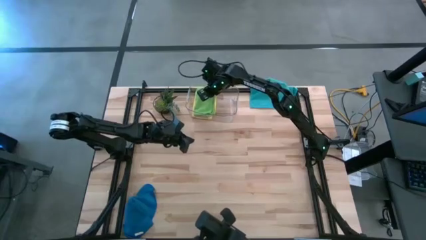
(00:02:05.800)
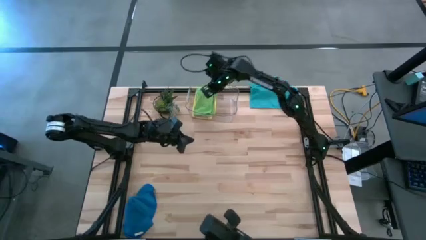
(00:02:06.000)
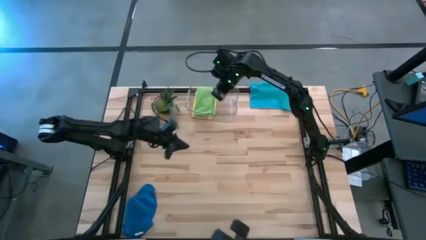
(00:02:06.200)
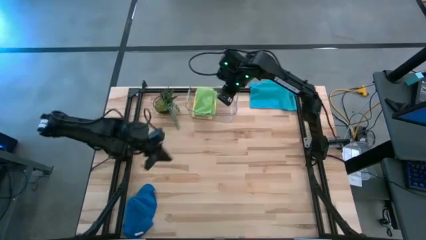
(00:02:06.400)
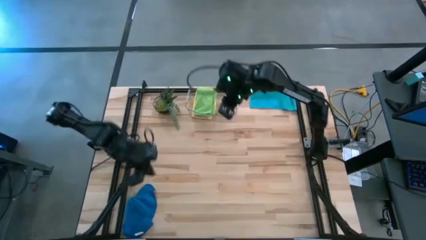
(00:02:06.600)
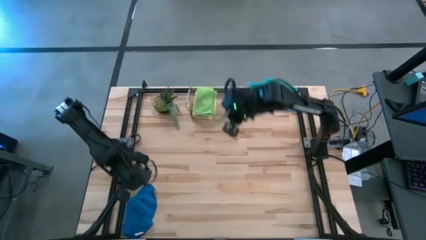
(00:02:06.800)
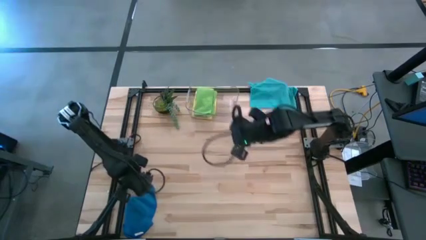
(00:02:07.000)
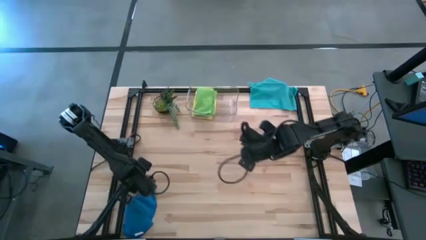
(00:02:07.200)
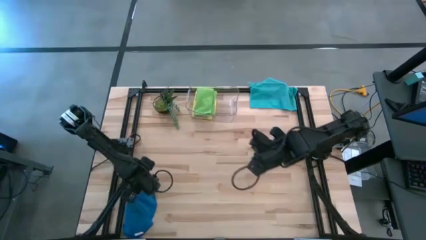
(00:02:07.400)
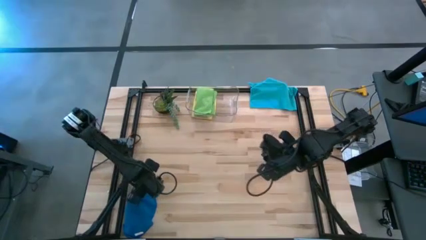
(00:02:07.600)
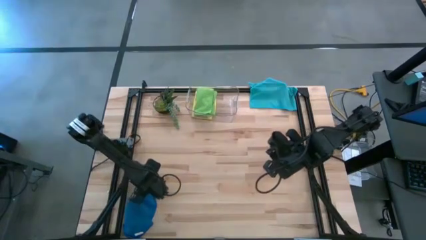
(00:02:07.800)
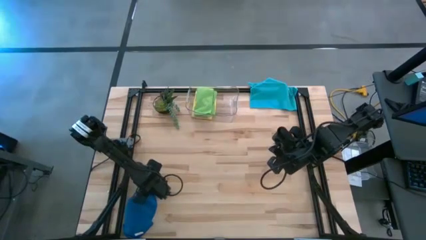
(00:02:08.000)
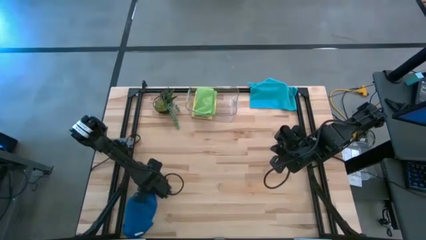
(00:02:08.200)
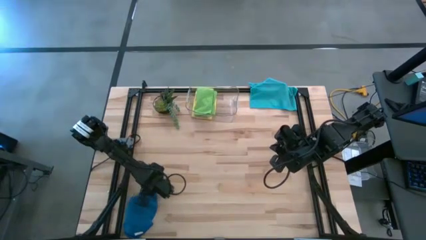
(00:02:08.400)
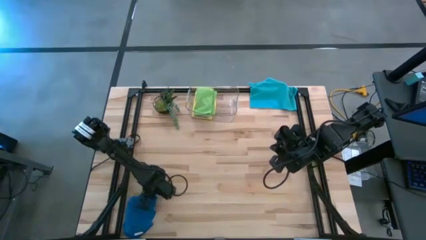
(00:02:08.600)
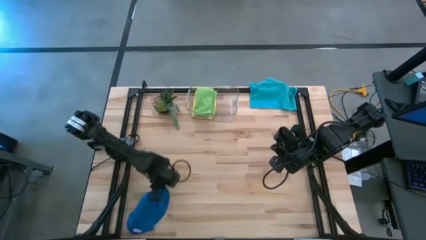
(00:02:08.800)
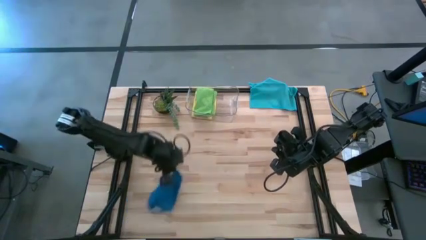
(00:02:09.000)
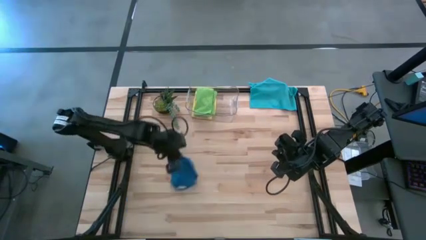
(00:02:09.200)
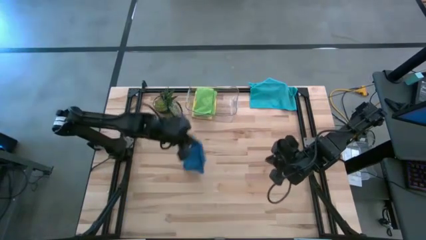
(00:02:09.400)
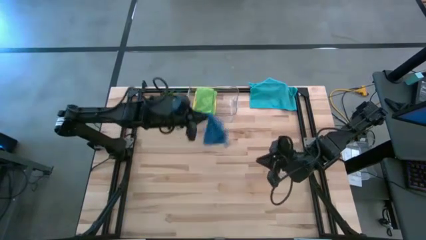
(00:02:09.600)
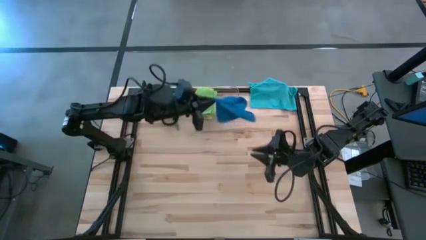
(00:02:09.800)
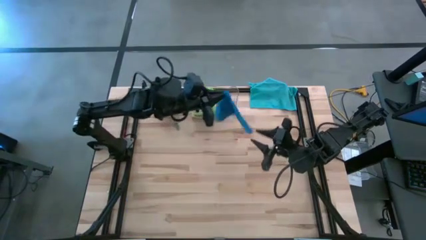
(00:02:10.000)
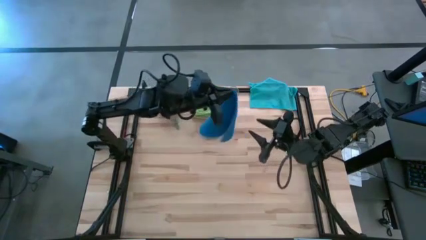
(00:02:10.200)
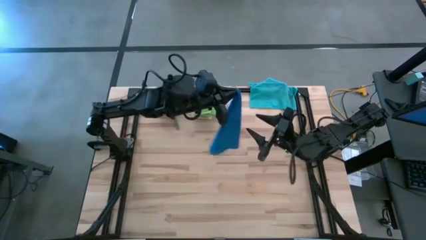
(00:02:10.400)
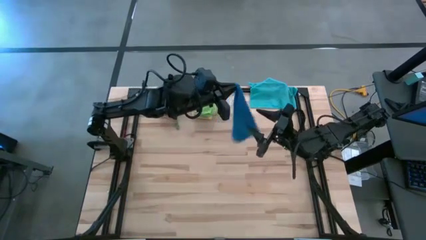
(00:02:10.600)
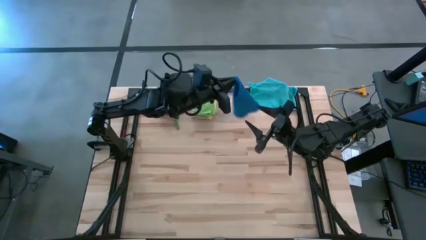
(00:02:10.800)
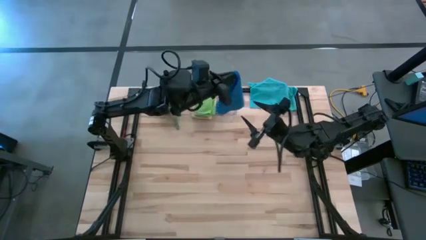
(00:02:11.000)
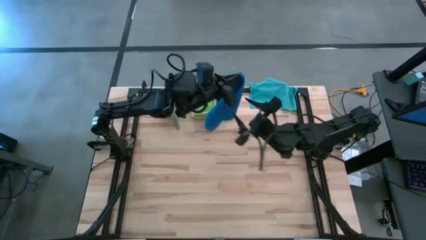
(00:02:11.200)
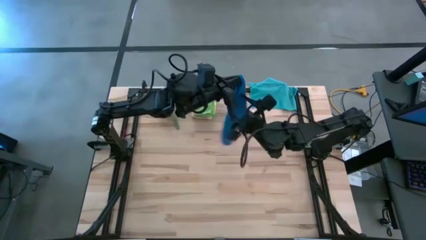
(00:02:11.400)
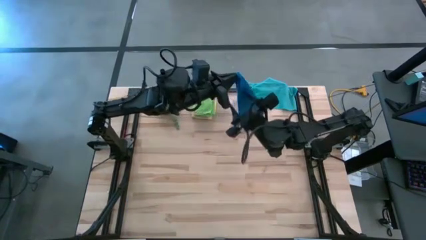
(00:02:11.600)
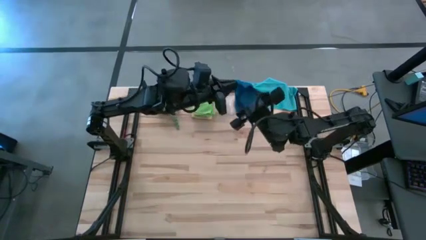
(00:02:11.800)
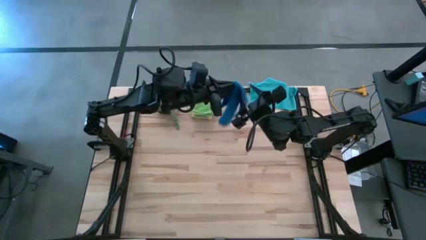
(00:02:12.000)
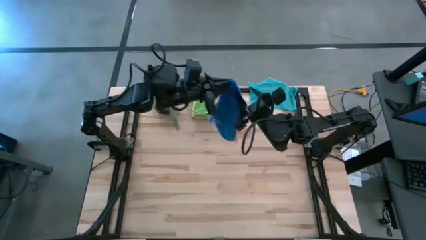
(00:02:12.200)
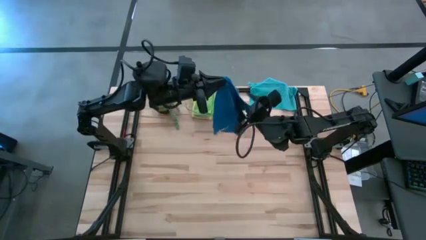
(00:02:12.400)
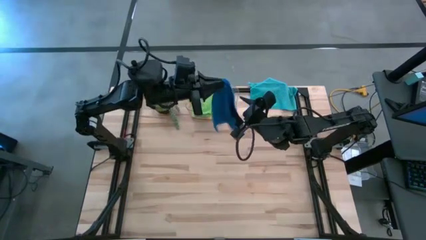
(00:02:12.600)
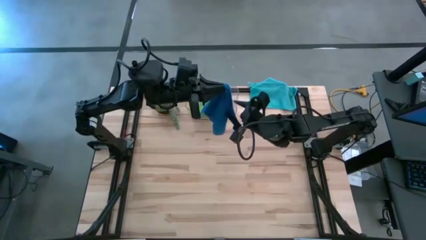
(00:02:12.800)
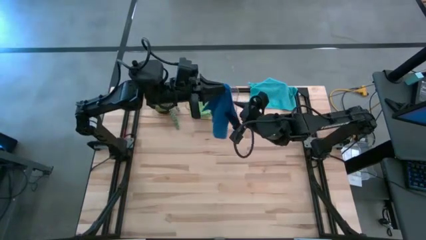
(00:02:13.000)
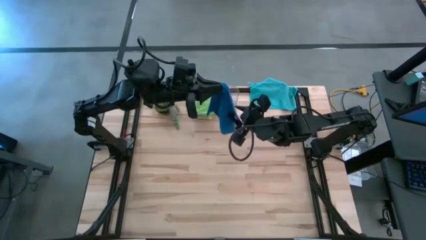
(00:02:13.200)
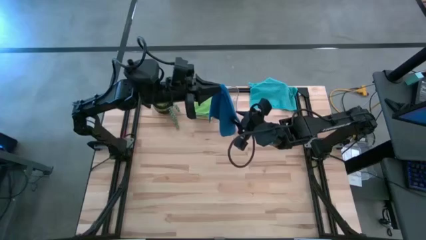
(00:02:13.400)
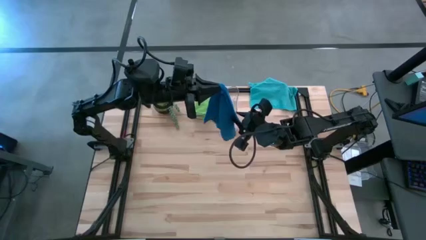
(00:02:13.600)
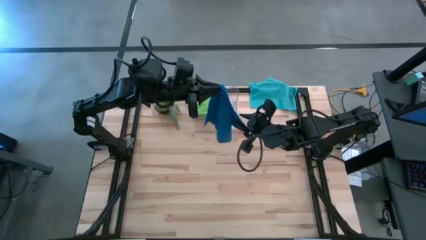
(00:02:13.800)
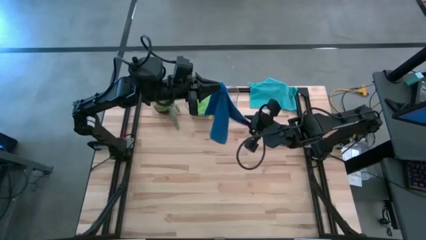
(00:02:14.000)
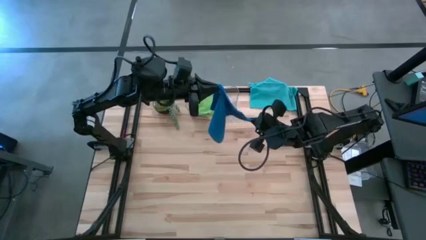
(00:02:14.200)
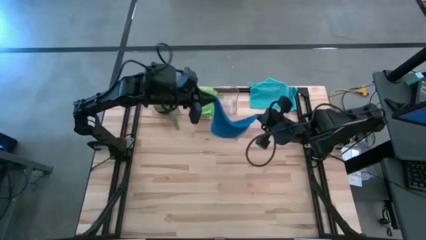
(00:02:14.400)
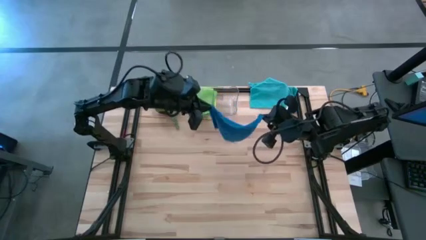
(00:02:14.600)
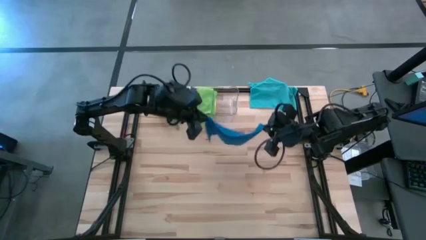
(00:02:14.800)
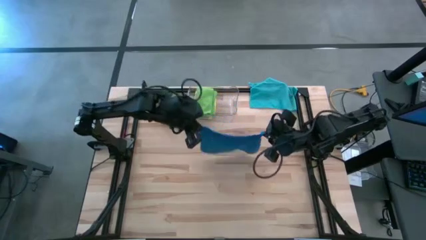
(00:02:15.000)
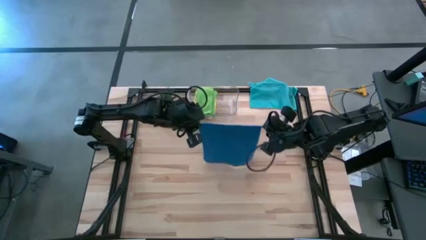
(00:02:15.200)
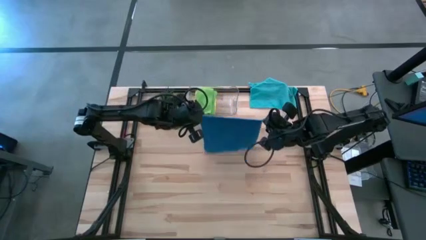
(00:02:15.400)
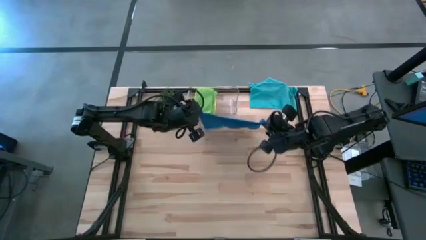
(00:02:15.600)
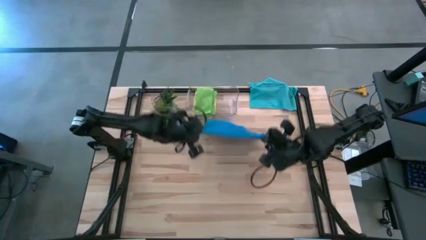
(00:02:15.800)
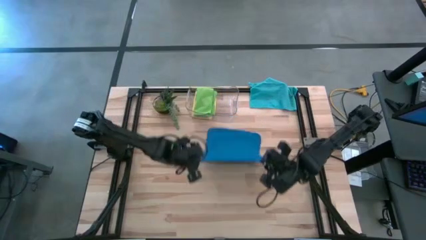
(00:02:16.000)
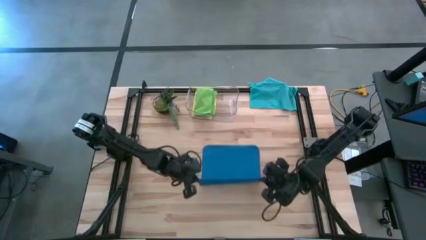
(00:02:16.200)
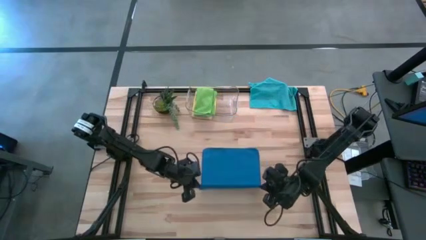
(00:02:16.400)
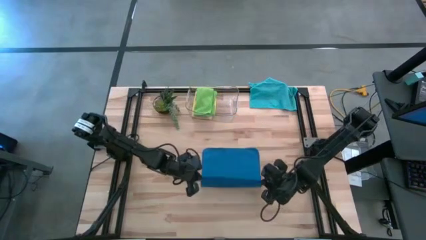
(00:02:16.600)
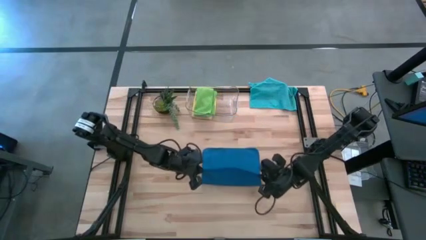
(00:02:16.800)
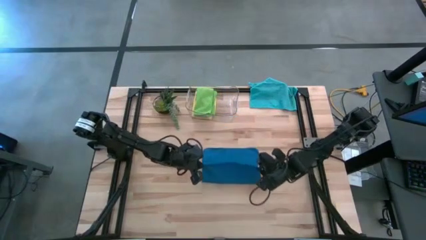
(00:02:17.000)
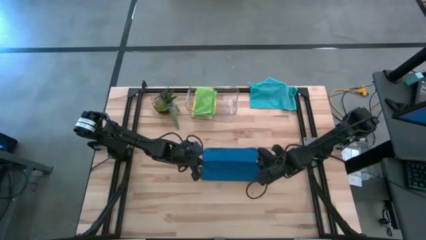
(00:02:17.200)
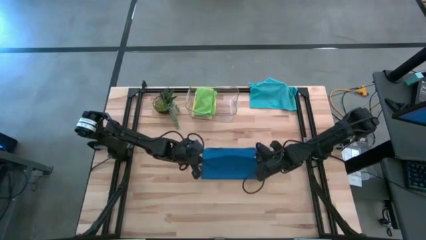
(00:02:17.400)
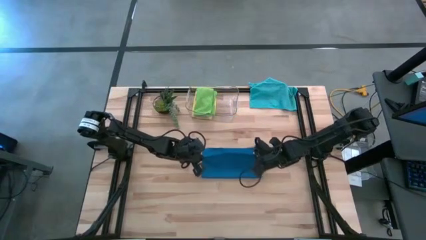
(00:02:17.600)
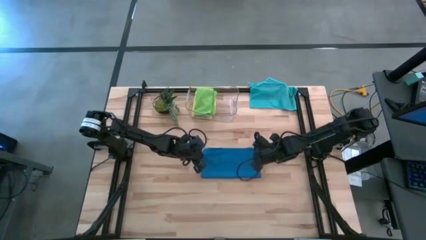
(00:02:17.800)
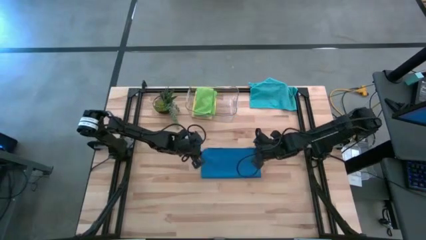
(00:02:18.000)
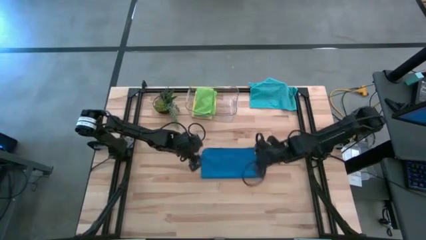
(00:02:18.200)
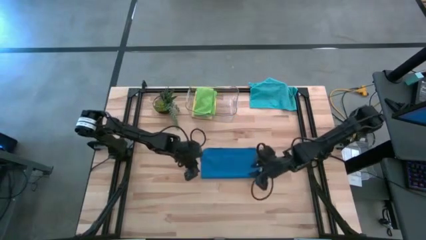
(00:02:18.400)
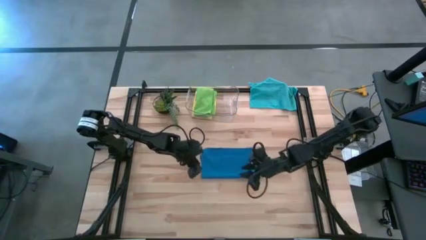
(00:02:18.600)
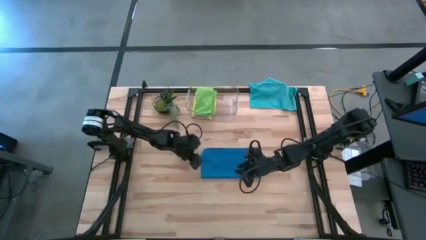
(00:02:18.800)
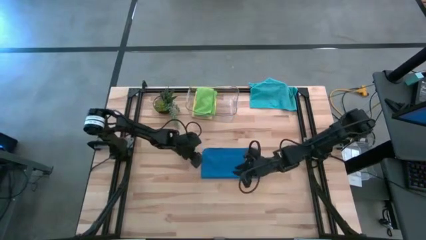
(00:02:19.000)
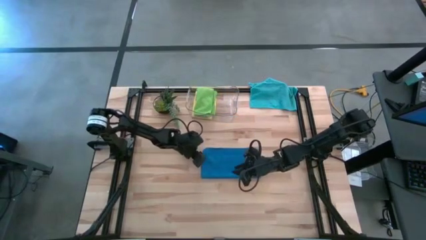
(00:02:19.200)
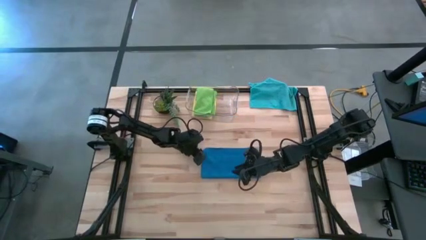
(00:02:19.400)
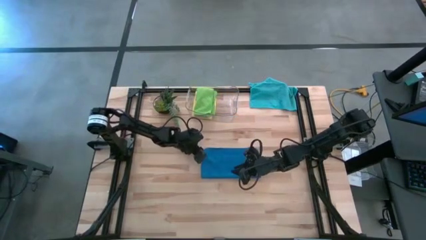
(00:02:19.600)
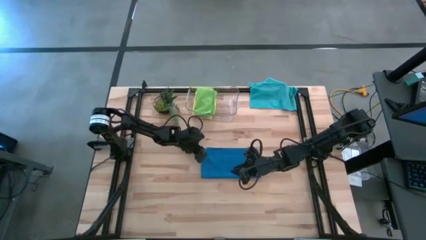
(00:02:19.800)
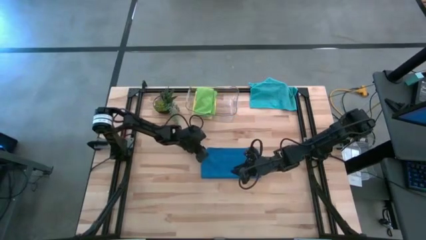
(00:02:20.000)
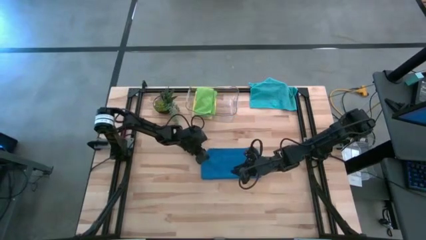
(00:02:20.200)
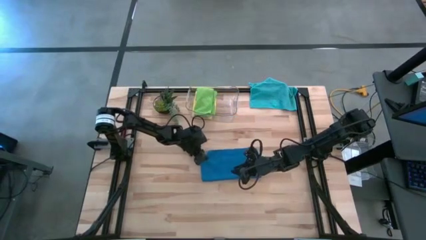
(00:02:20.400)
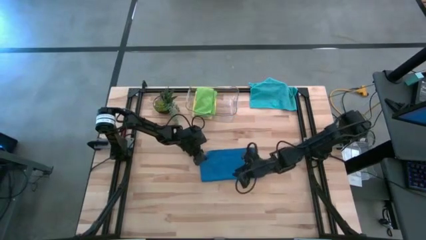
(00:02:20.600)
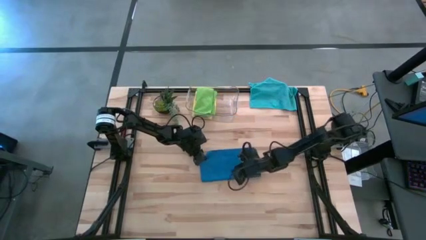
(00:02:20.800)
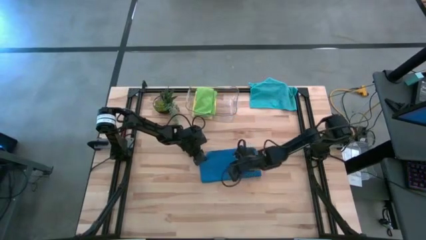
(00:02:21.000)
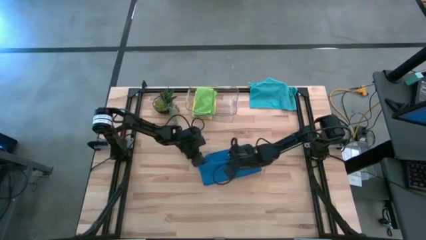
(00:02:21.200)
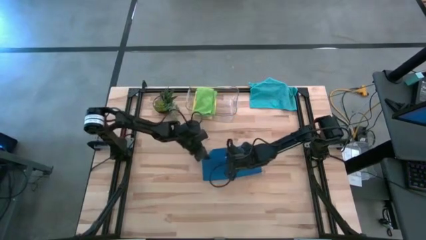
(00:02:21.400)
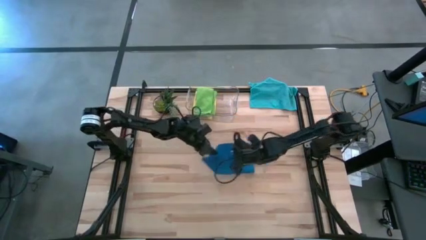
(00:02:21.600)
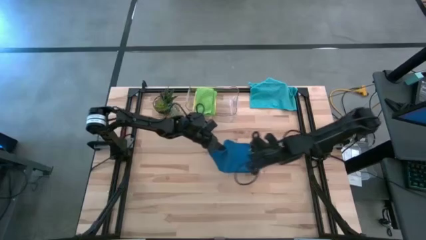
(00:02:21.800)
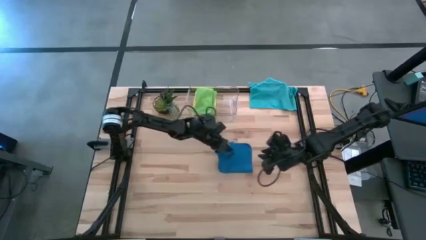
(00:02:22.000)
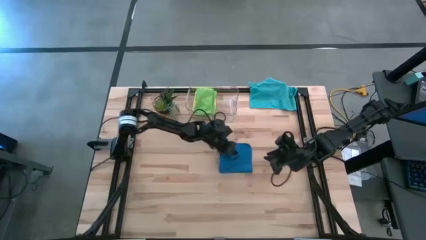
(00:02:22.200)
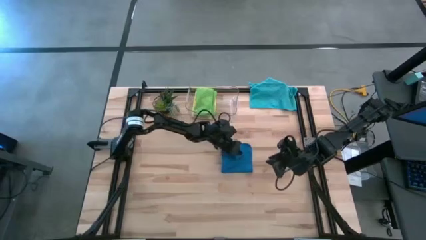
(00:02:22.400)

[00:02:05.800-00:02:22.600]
Task: Fold microfiber towels
Fold the bottom blue towel
